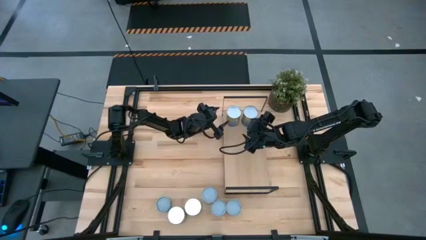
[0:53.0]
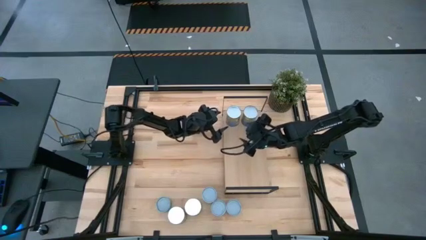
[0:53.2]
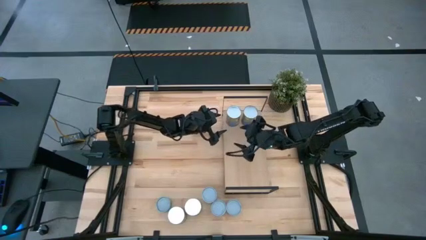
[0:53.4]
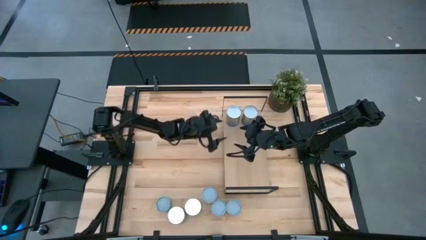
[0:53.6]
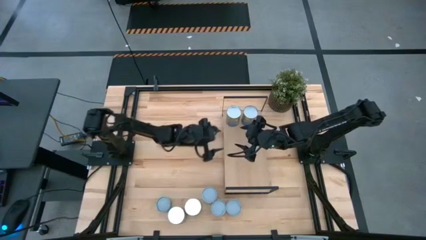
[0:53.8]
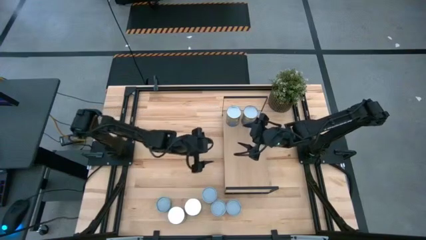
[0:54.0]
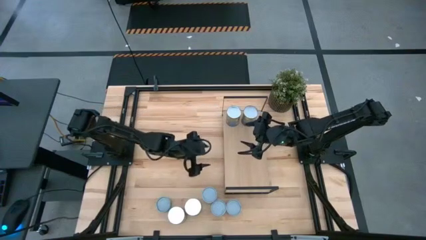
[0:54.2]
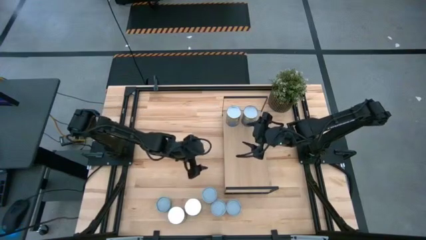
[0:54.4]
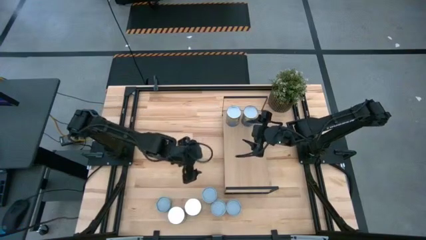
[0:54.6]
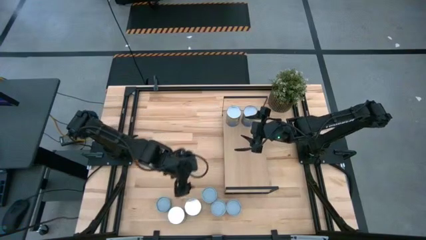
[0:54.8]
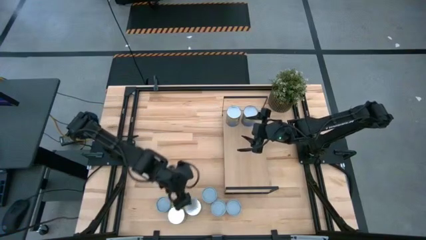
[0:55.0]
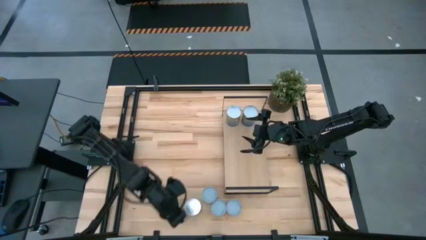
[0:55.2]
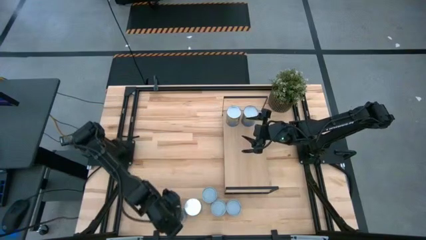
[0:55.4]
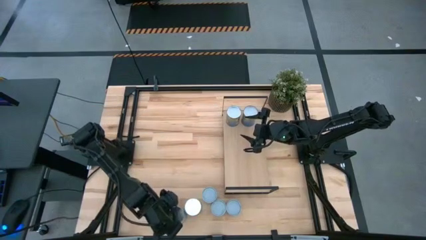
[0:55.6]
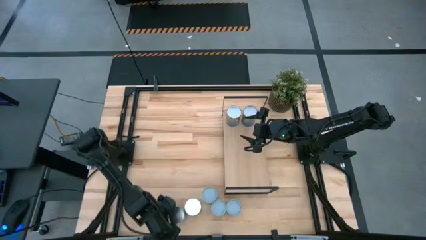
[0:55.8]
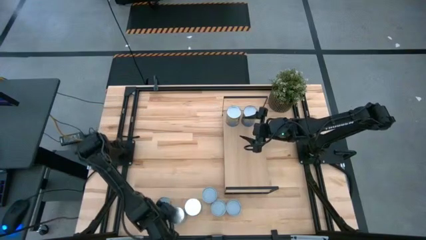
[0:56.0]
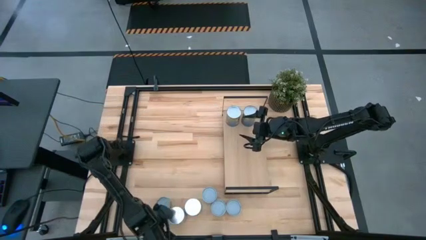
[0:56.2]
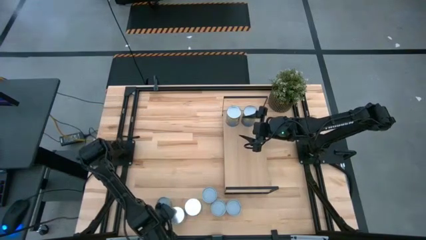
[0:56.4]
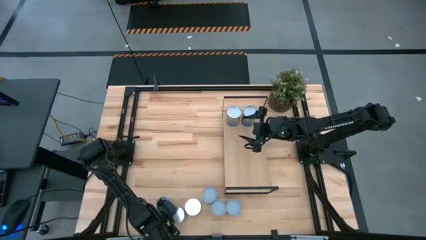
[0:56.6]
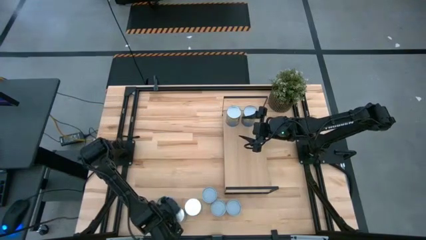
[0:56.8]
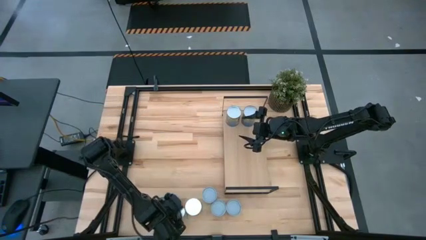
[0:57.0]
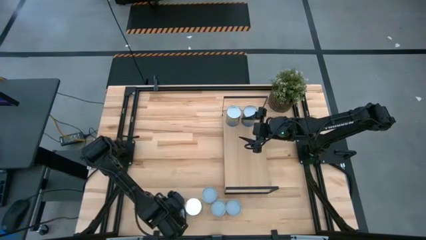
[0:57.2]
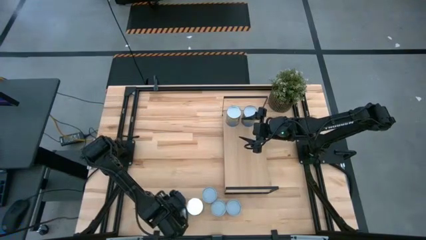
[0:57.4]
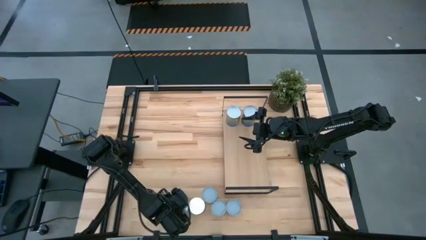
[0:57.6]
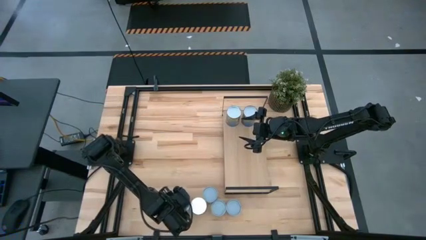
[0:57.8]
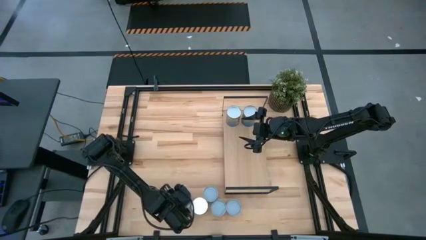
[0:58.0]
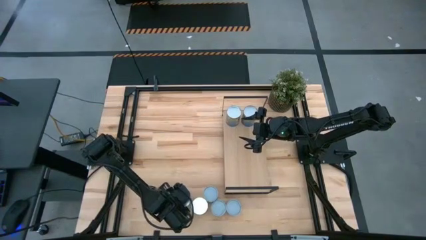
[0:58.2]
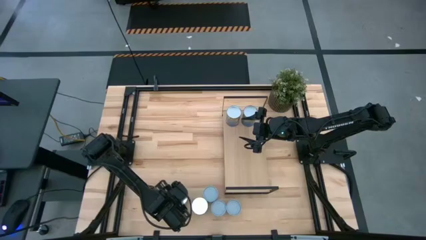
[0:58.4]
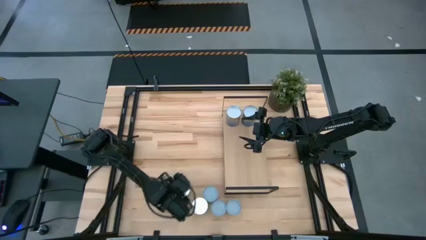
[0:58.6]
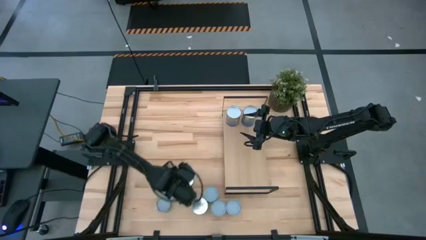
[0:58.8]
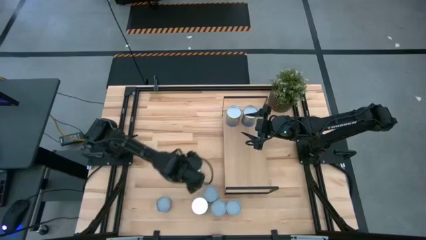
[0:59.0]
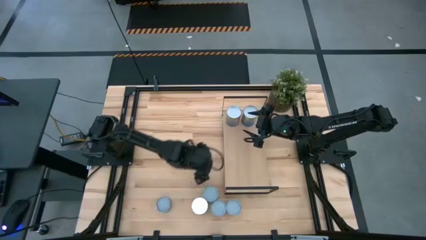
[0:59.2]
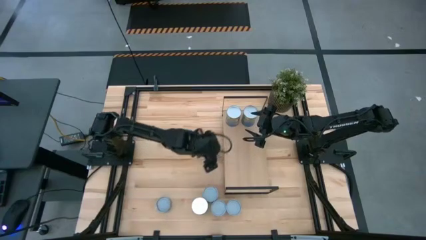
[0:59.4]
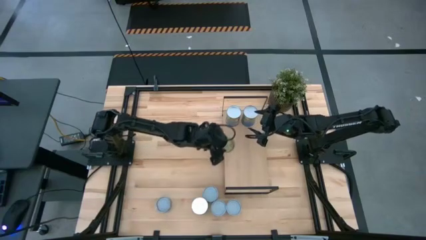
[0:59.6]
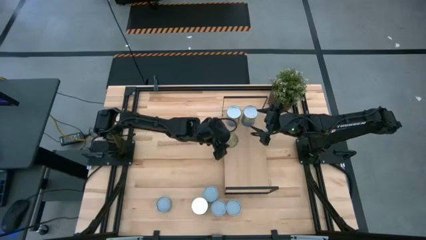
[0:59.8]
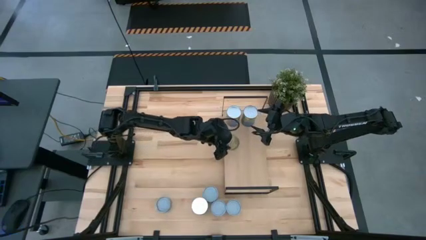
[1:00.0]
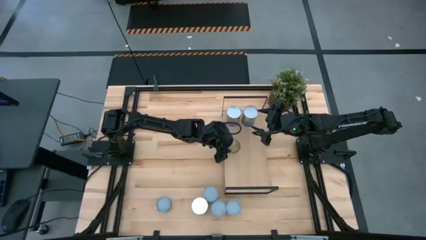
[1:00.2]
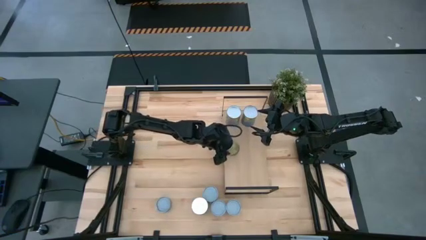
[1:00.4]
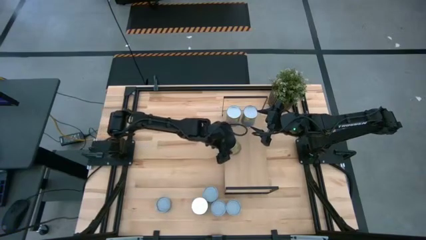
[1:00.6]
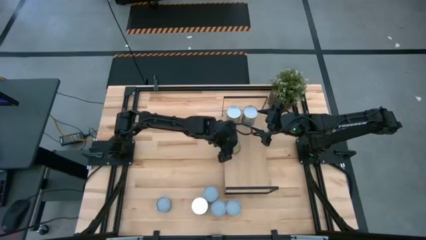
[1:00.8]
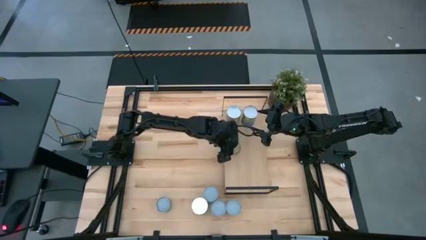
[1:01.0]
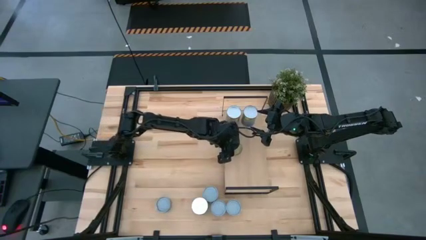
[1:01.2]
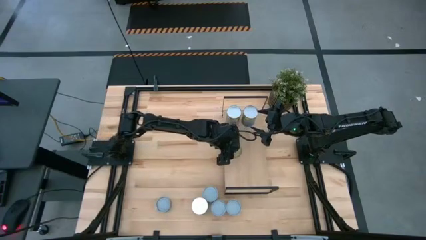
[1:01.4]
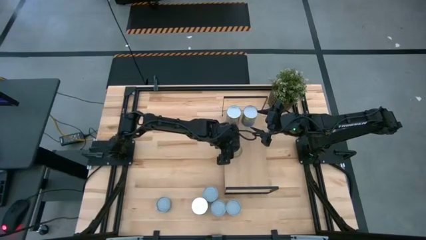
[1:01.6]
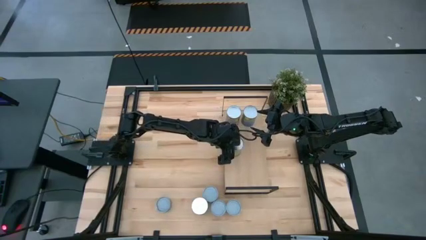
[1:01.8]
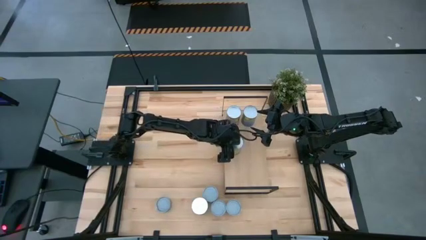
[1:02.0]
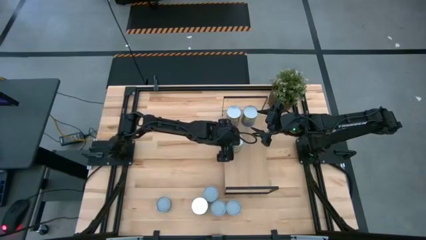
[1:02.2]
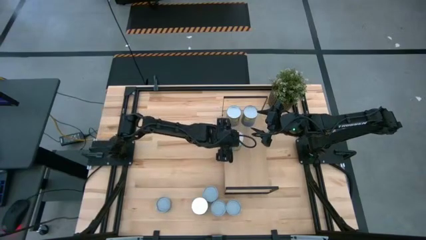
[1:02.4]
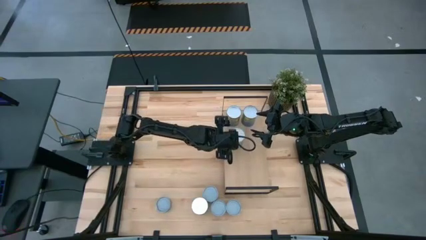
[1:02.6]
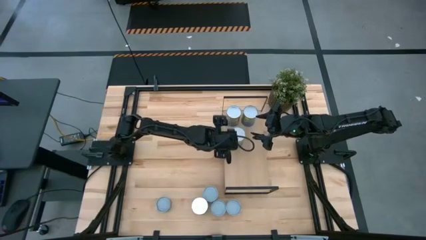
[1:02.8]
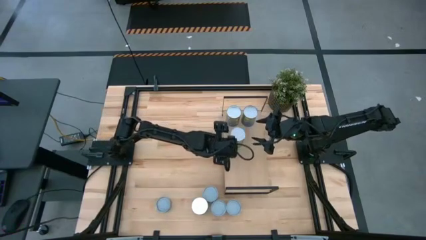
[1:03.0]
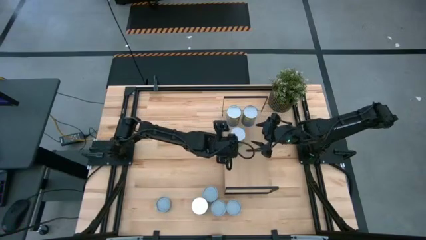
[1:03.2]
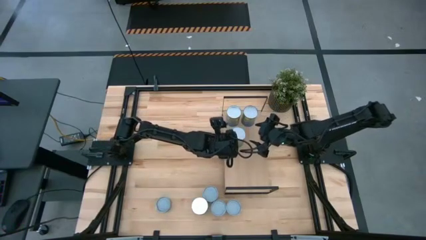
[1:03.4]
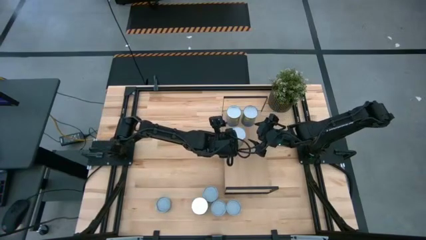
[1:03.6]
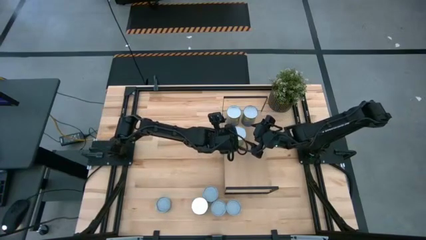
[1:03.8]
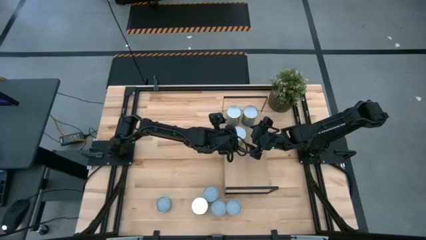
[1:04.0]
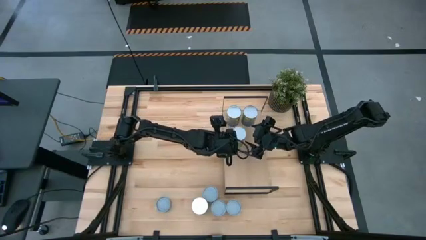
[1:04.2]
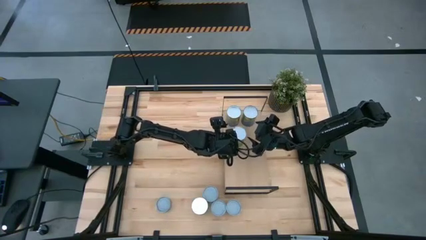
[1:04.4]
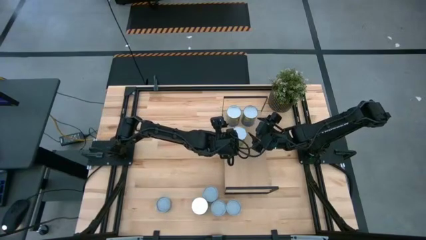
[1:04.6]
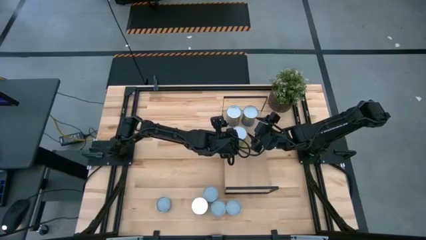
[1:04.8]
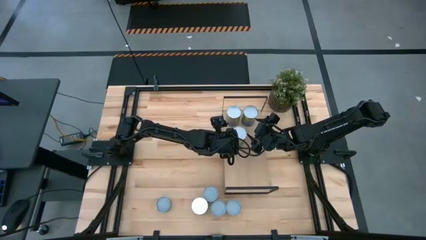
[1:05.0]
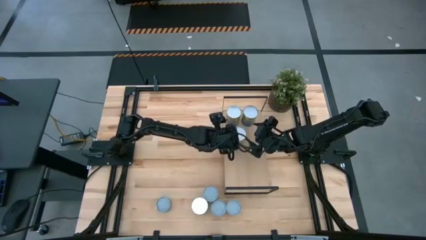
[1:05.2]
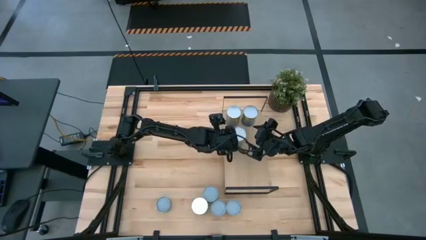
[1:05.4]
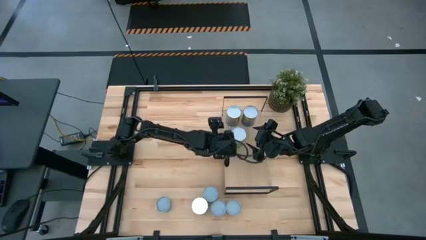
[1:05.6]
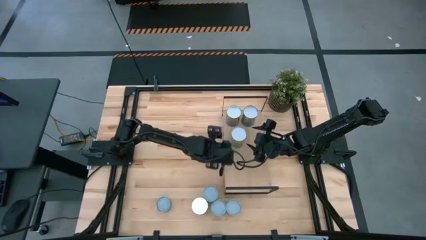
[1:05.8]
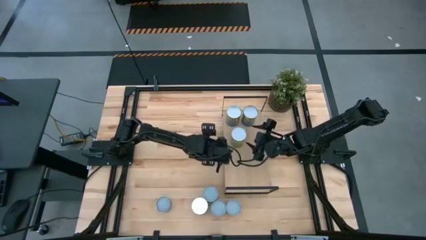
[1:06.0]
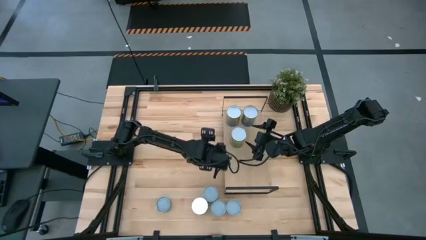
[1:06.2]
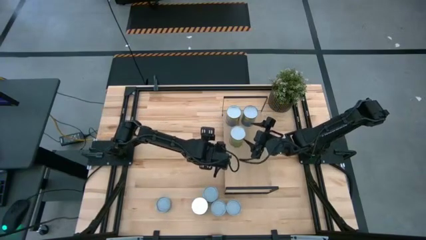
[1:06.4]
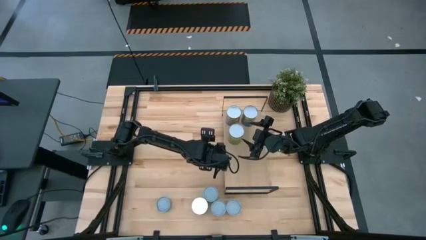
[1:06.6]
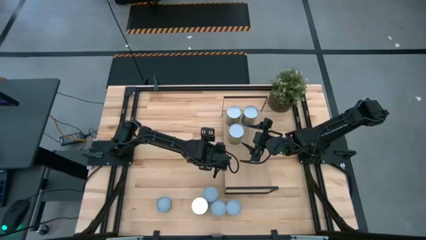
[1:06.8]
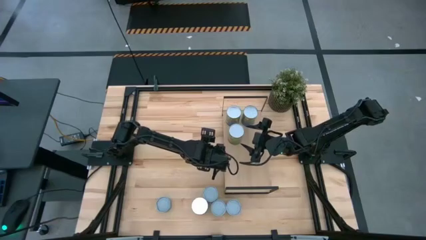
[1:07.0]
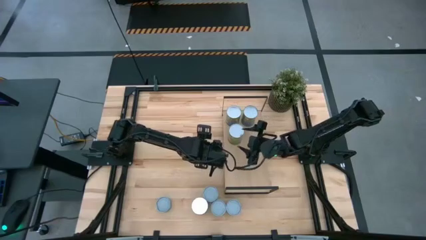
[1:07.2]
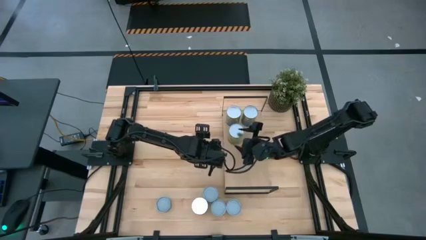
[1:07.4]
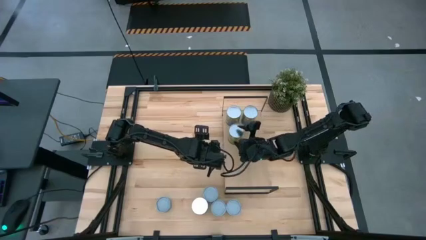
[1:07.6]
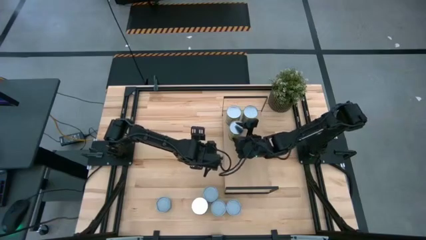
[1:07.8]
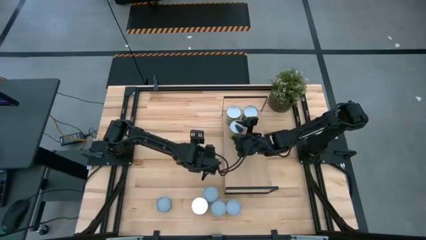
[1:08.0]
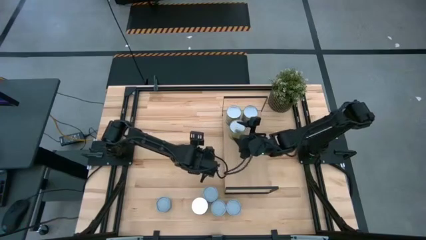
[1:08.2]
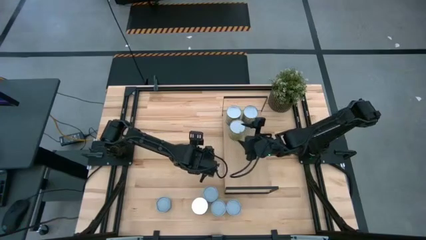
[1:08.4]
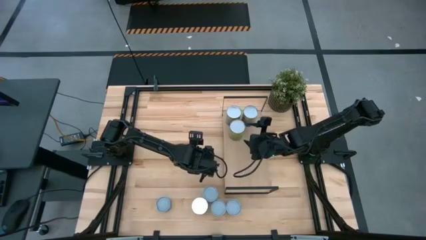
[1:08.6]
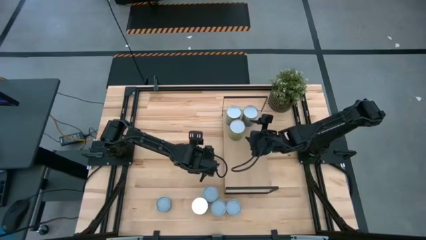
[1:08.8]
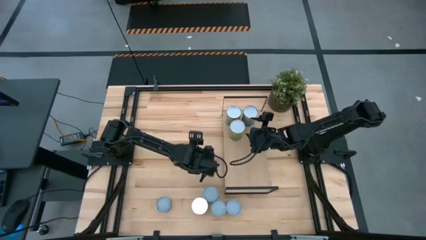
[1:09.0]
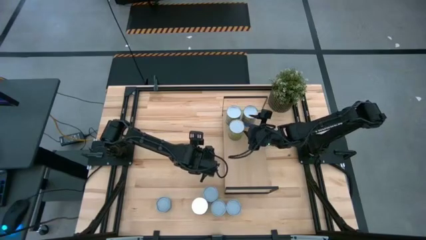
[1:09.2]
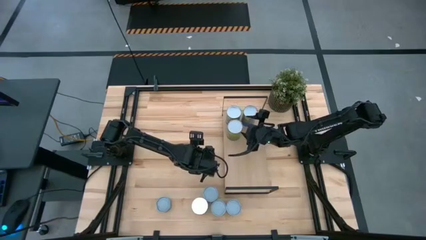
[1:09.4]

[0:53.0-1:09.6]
Task: Pick and place cans onto a shelf
Put the canned oranges on the shelf
